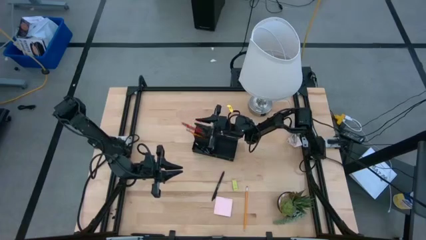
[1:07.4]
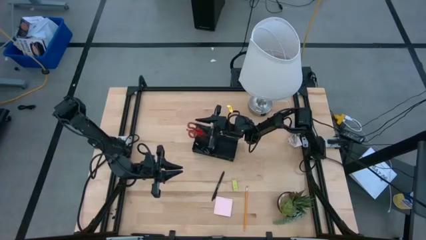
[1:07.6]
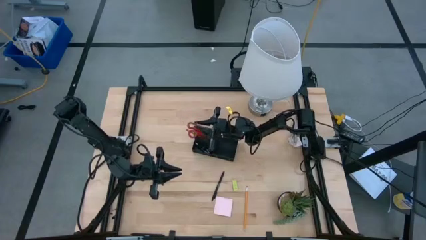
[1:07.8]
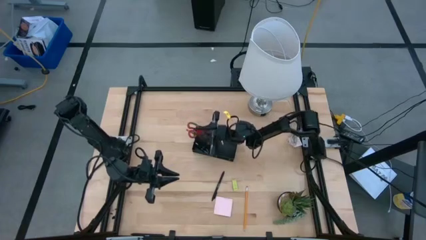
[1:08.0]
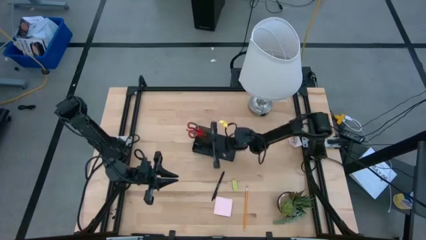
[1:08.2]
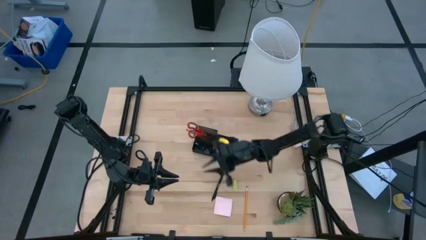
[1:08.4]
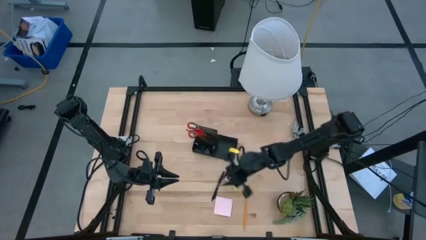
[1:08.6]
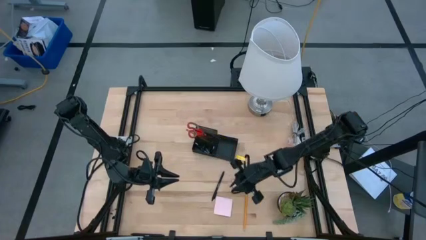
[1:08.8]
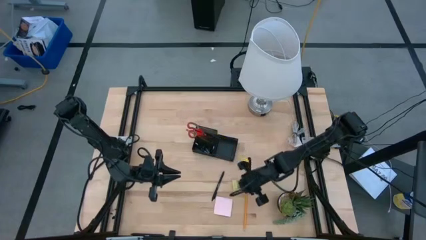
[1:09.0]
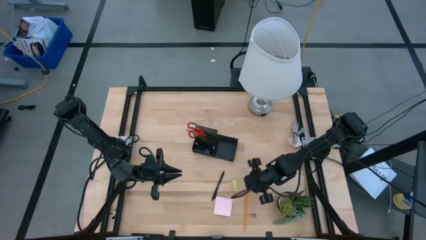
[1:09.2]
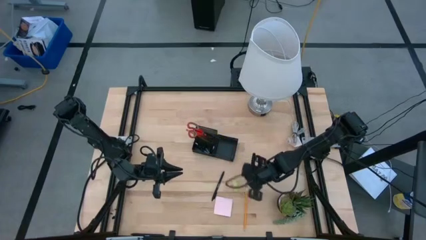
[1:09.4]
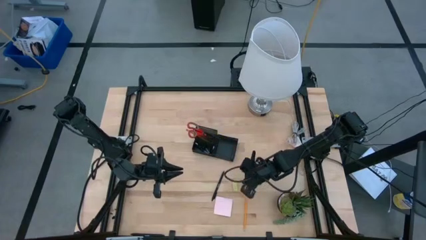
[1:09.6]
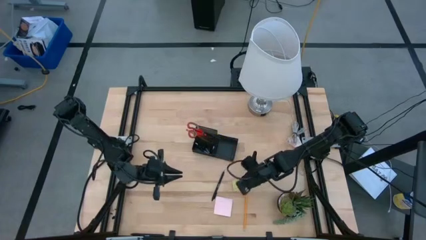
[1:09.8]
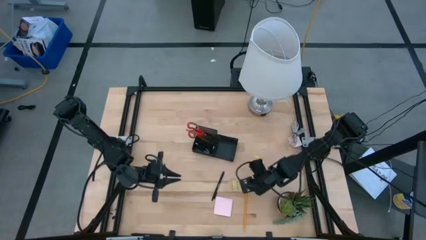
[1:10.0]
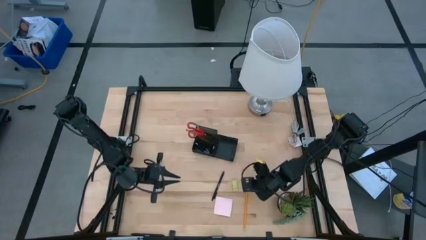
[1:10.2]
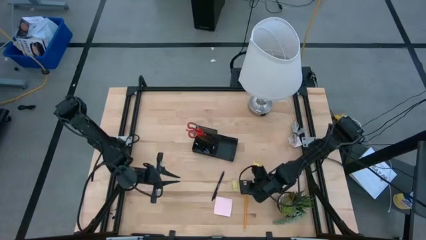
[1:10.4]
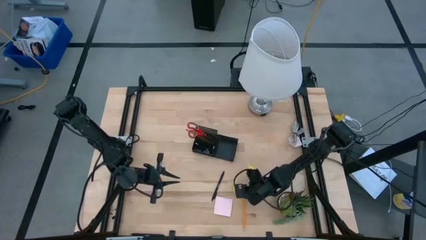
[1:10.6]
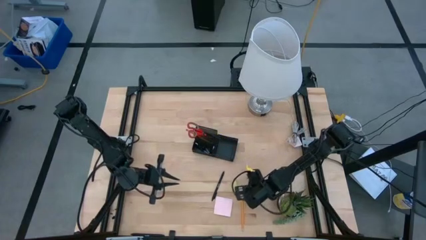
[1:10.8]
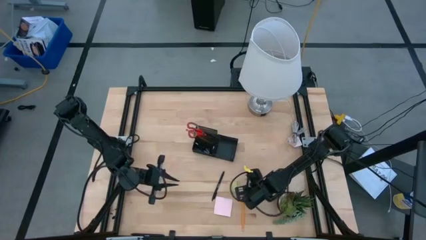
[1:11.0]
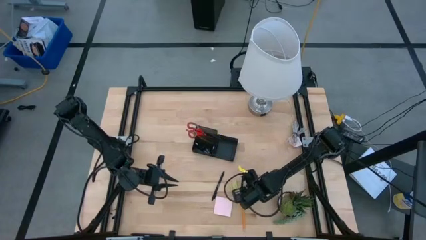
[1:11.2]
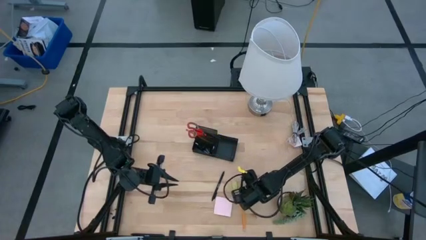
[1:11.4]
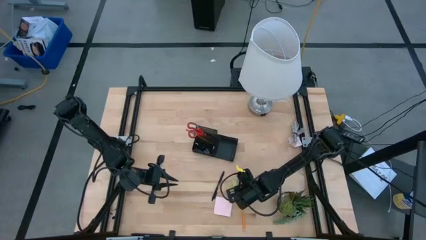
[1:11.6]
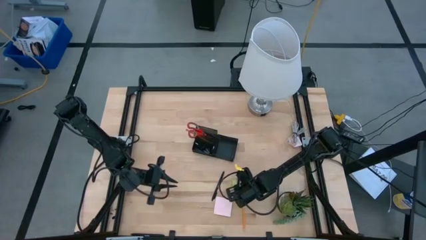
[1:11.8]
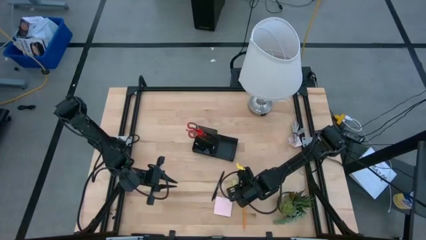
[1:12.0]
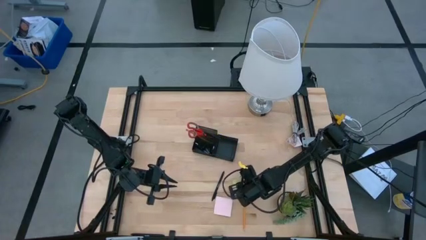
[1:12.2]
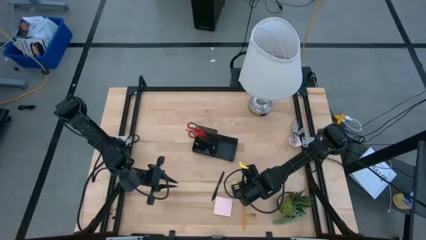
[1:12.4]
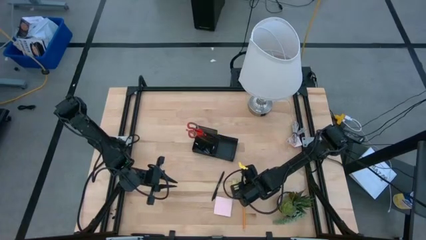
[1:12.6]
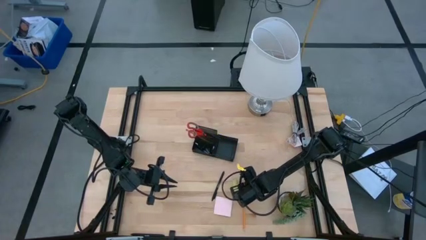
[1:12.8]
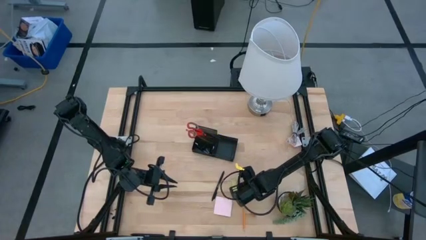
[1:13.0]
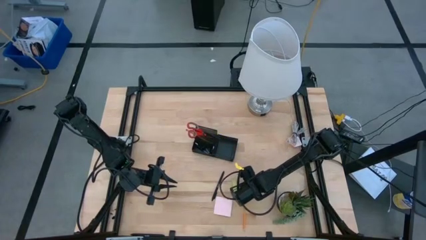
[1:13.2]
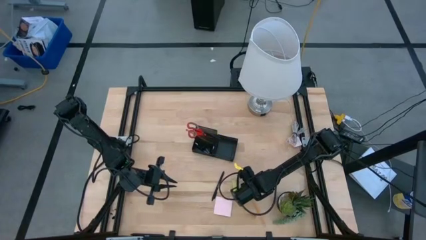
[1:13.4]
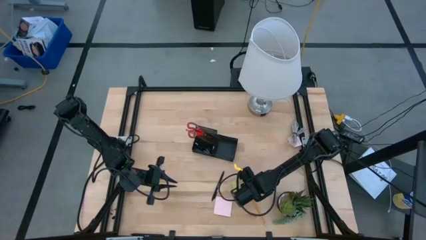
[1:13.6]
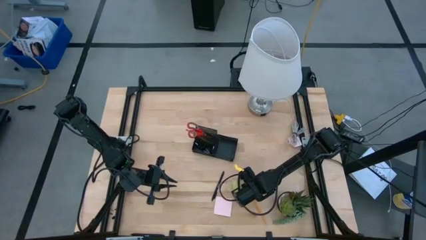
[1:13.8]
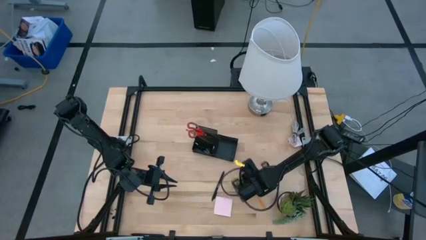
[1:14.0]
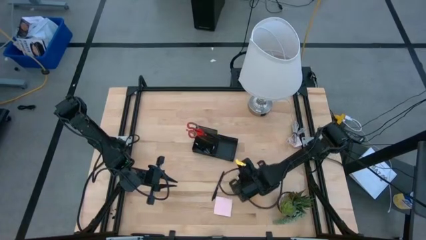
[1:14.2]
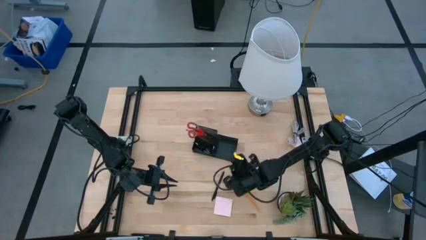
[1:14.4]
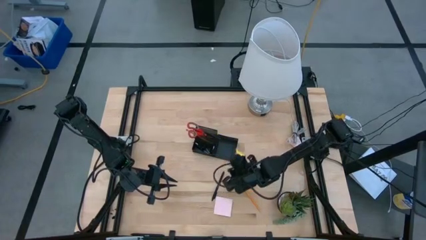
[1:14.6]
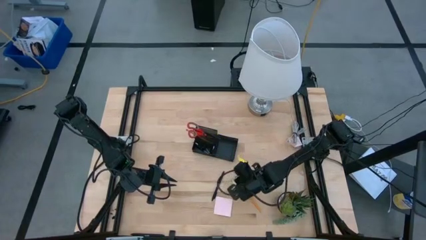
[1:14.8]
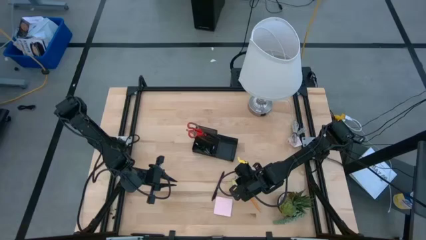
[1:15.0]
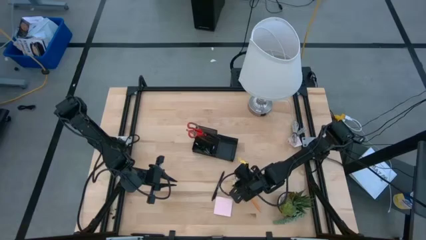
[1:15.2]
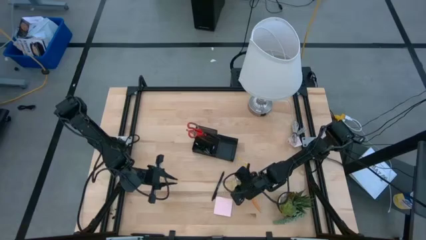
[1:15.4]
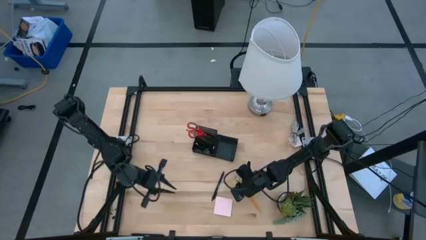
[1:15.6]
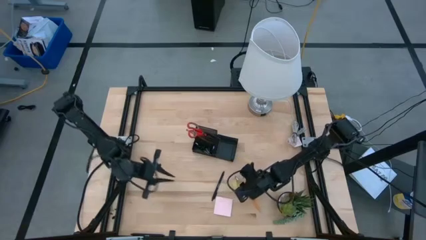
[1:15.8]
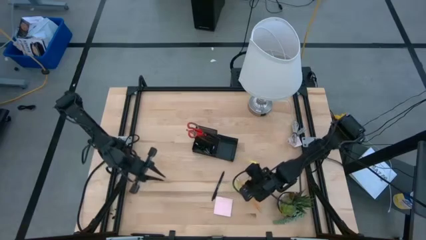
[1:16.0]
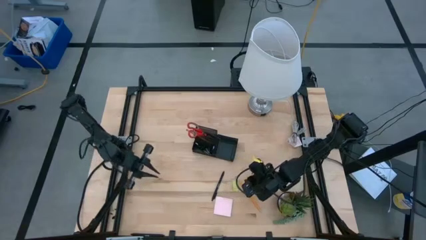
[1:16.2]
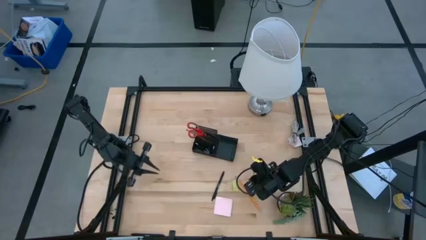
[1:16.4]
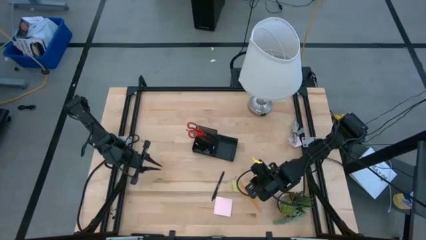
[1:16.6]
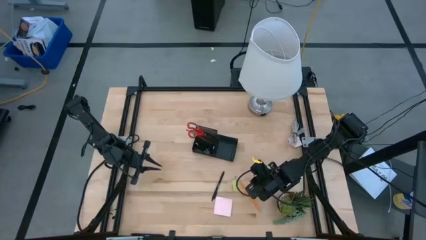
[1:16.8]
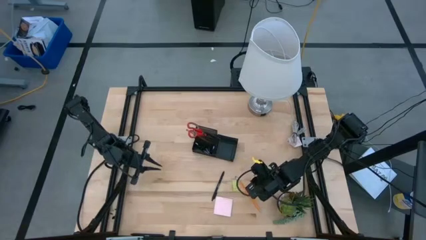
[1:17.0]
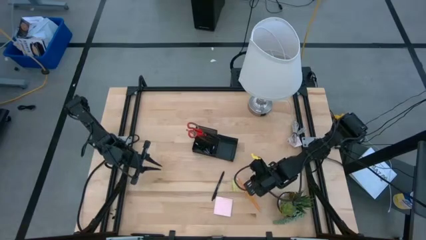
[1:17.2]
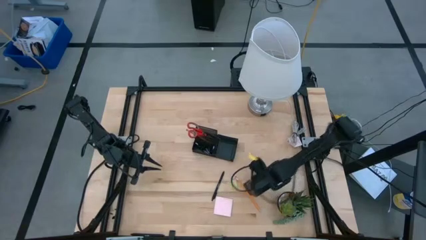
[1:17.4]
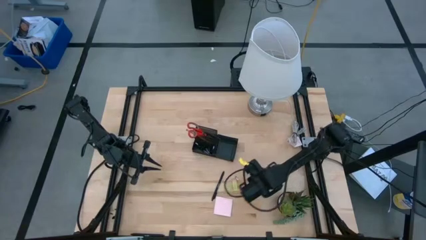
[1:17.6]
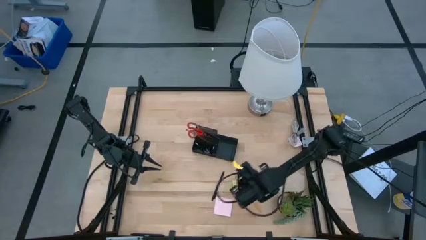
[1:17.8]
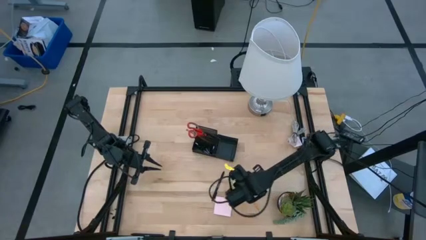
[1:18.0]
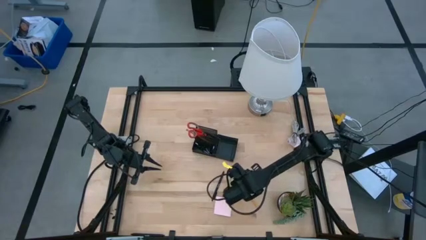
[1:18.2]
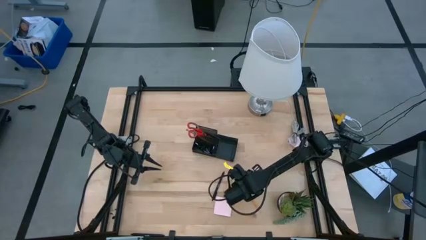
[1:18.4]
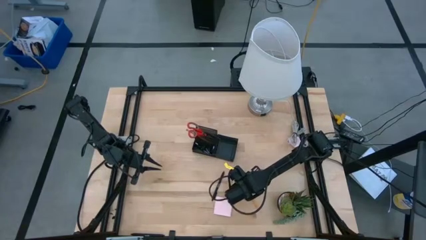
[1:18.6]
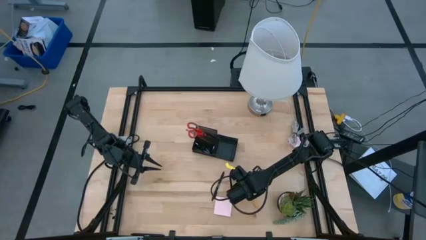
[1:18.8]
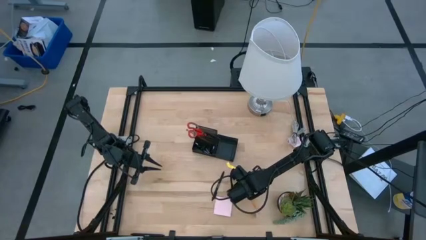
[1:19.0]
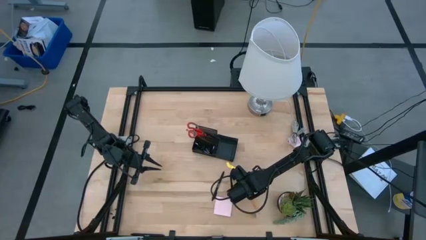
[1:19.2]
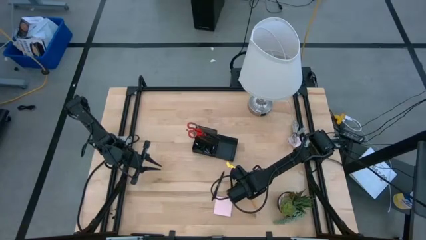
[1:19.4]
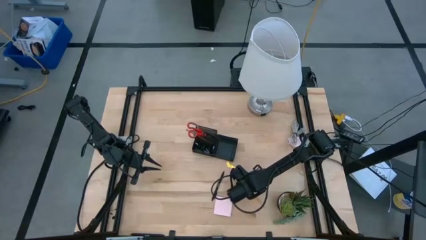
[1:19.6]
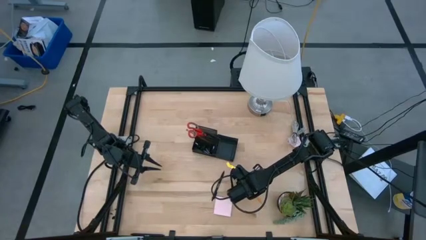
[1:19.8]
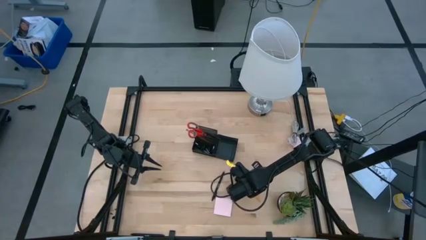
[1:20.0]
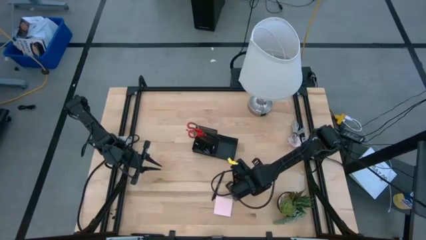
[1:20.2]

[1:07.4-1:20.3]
Task: Pick and place office supplies into organizer
Put the yellow pencil into the black desk organizer

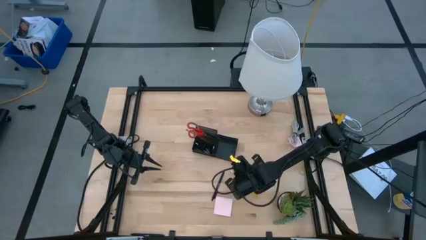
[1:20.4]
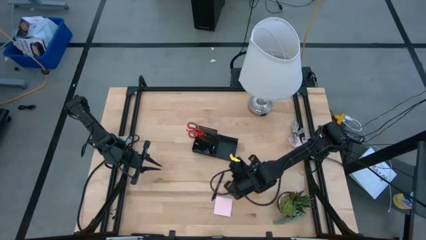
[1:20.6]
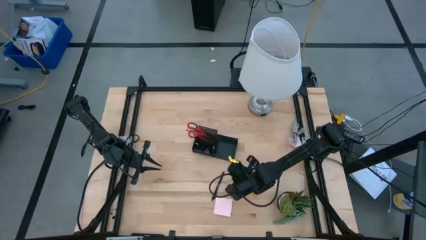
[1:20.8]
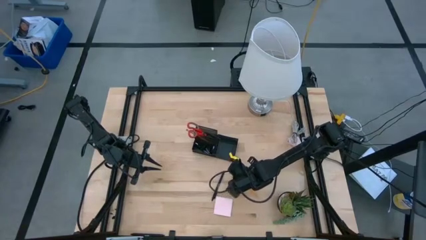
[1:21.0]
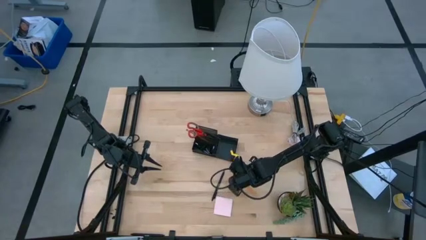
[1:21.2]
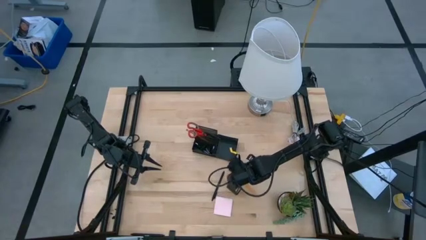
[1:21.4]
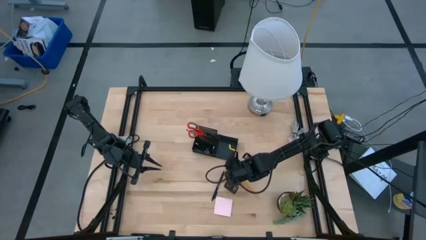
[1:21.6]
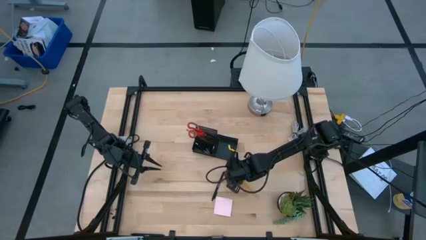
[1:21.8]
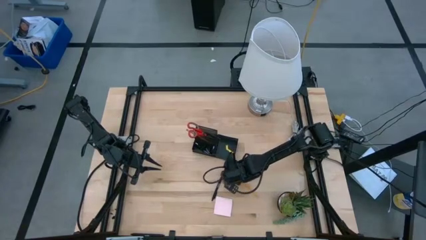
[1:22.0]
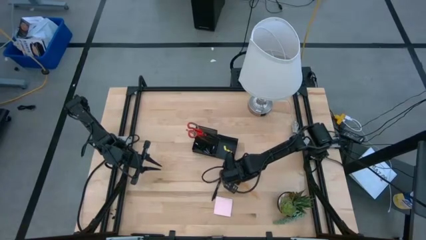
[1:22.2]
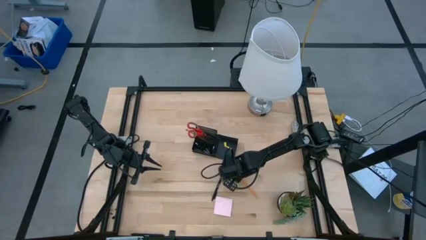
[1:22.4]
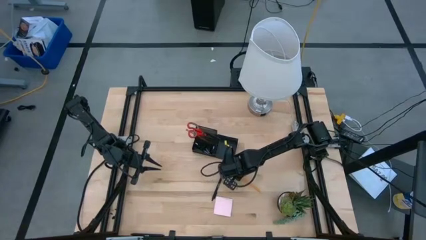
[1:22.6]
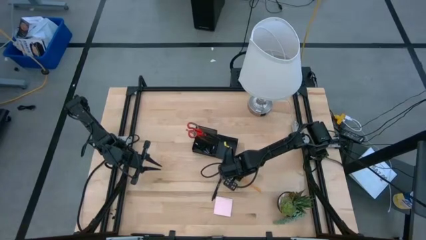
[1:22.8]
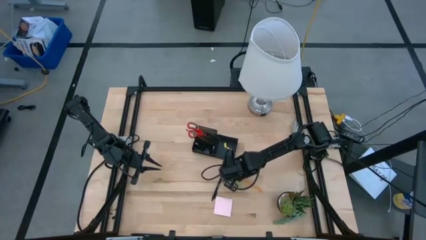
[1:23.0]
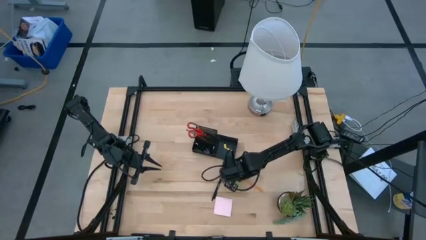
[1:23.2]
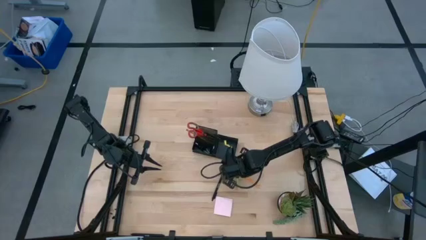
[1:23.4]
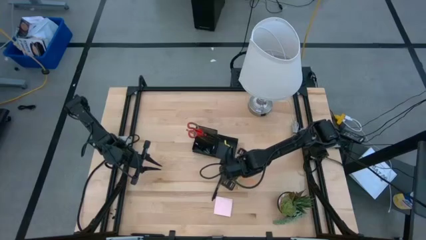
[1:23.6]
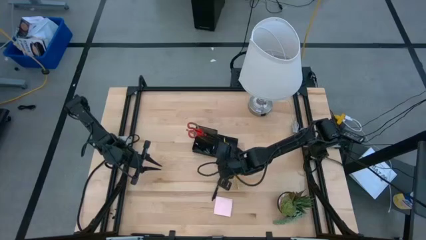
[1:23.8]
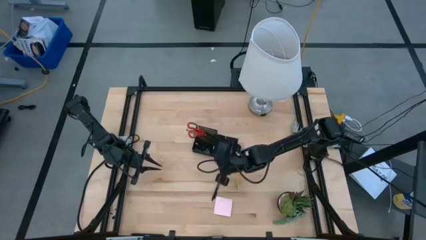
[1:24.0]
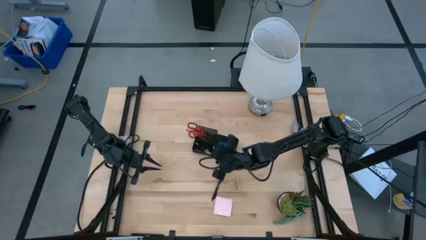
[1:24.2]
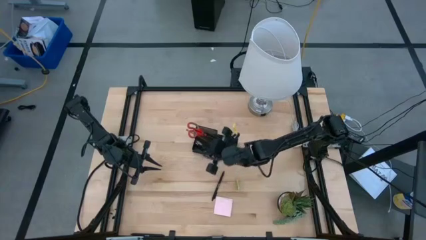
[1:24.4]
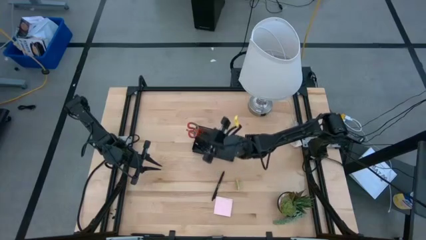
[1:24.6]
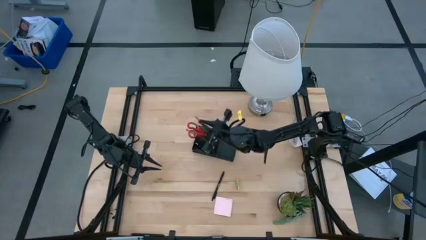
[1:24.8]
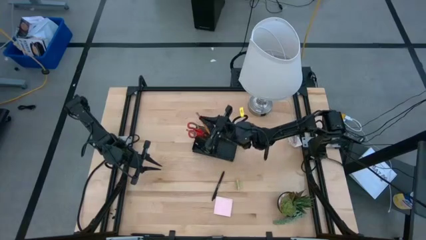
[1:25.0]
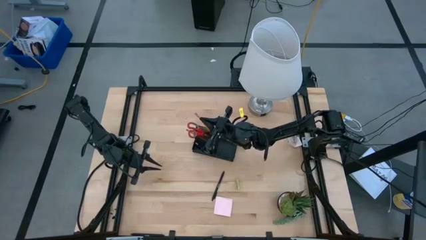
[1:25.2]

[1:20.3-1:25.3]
Put the yellow pencil into the black desk organizer
